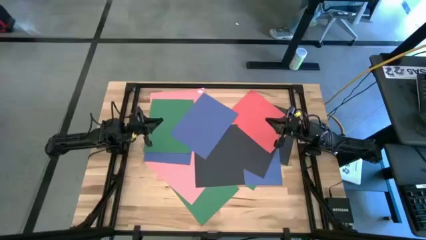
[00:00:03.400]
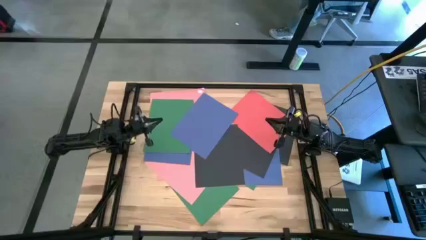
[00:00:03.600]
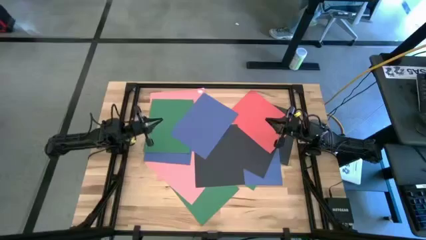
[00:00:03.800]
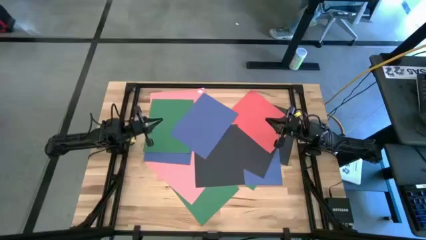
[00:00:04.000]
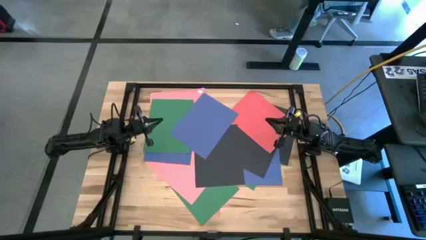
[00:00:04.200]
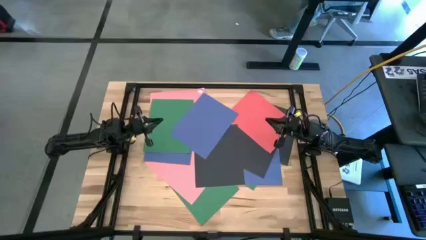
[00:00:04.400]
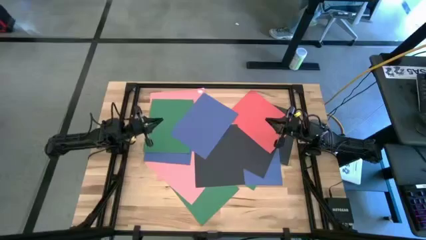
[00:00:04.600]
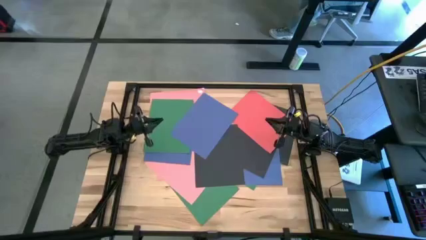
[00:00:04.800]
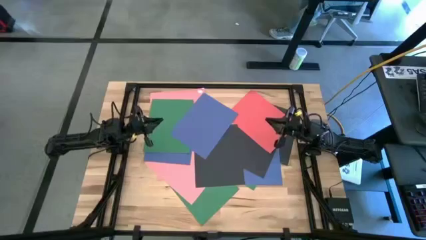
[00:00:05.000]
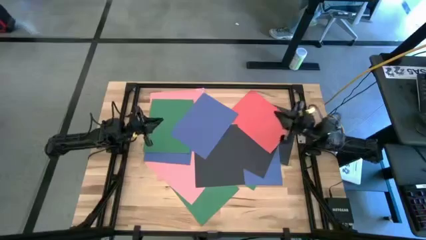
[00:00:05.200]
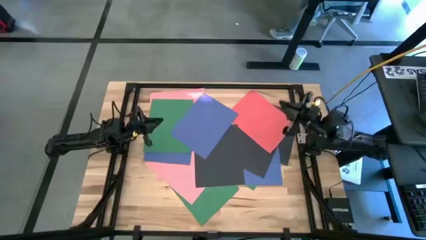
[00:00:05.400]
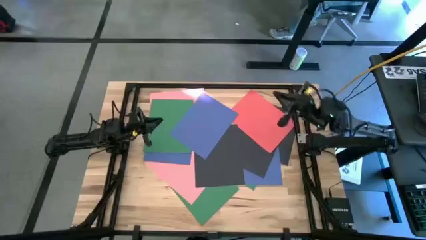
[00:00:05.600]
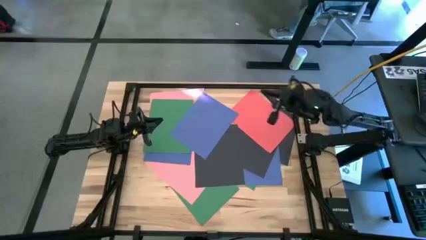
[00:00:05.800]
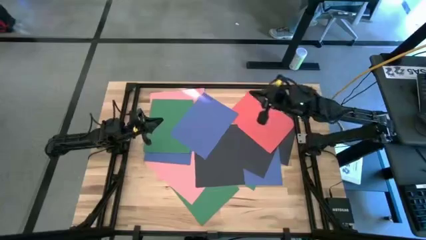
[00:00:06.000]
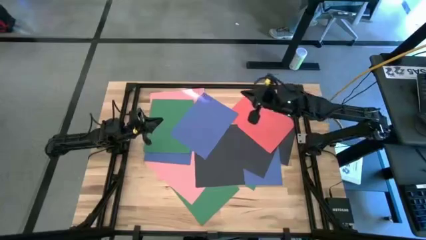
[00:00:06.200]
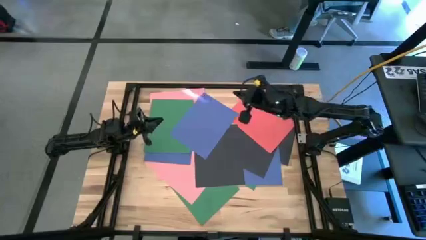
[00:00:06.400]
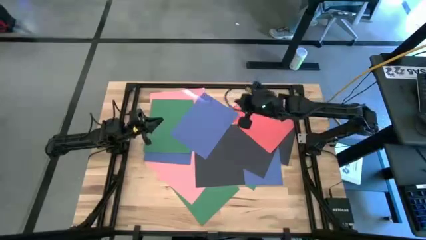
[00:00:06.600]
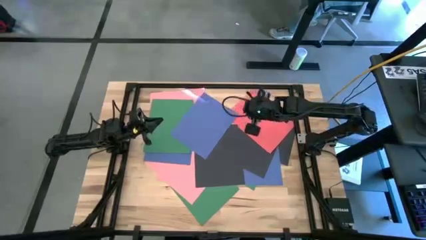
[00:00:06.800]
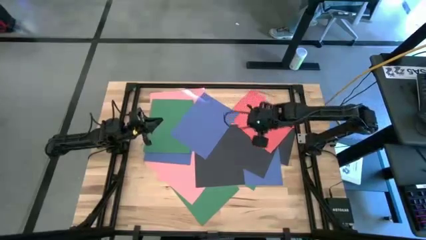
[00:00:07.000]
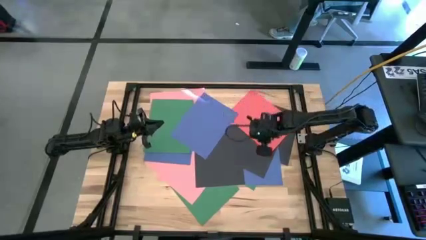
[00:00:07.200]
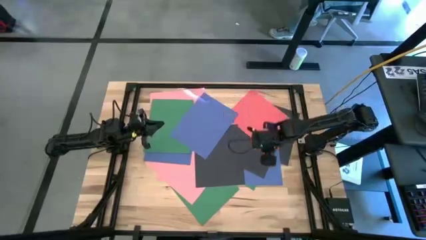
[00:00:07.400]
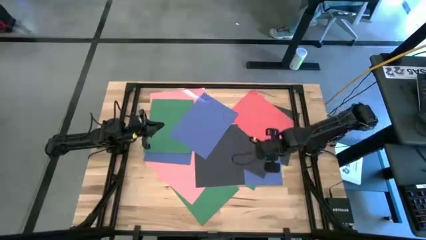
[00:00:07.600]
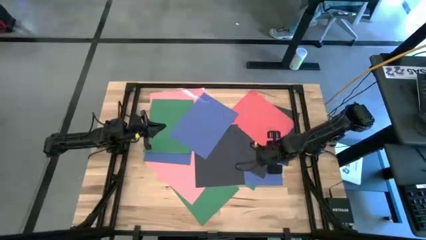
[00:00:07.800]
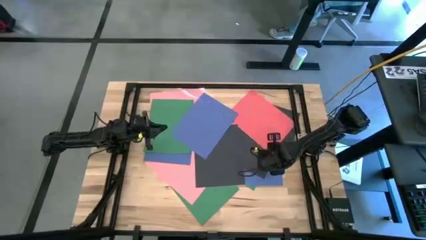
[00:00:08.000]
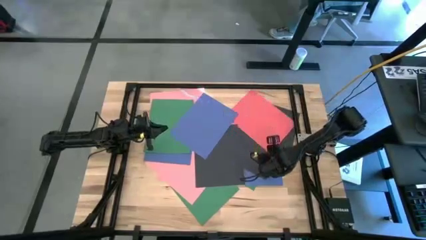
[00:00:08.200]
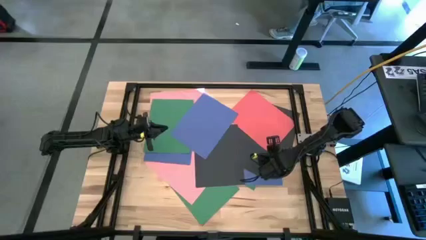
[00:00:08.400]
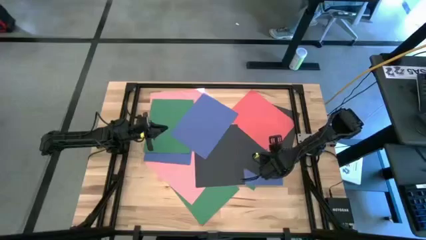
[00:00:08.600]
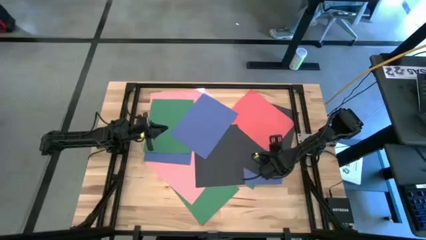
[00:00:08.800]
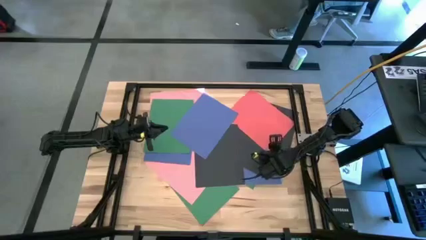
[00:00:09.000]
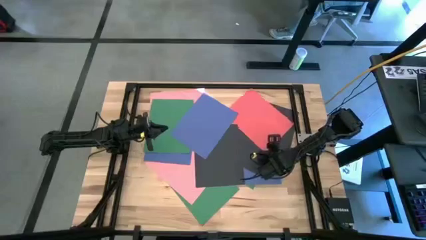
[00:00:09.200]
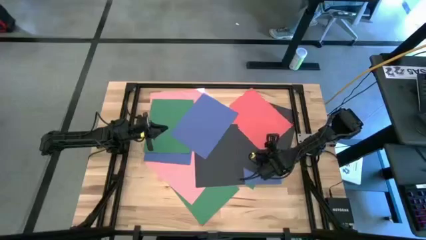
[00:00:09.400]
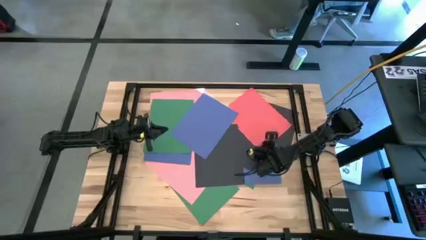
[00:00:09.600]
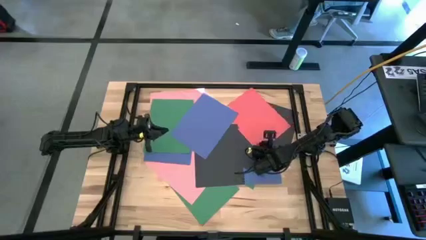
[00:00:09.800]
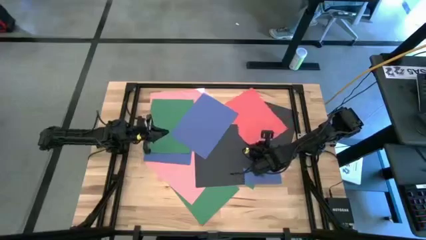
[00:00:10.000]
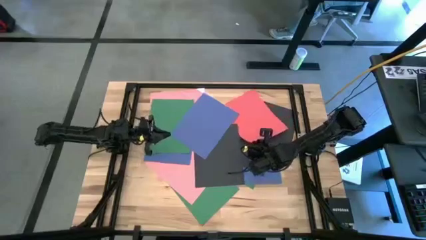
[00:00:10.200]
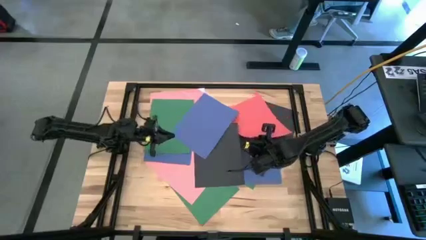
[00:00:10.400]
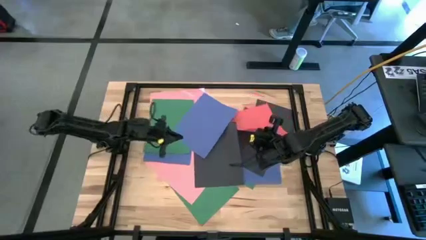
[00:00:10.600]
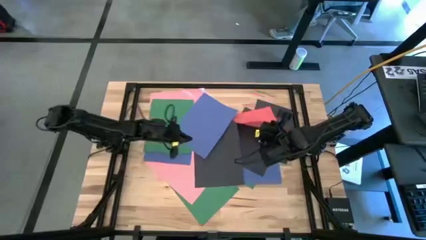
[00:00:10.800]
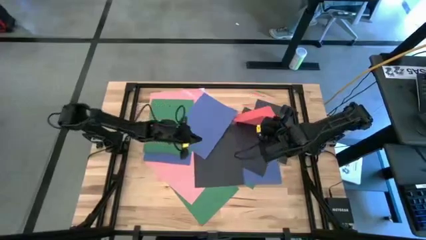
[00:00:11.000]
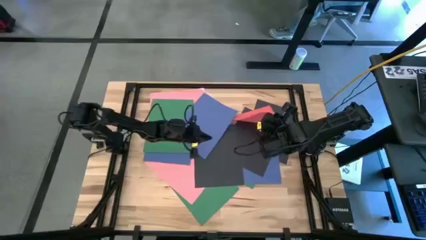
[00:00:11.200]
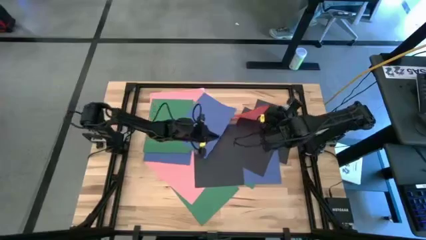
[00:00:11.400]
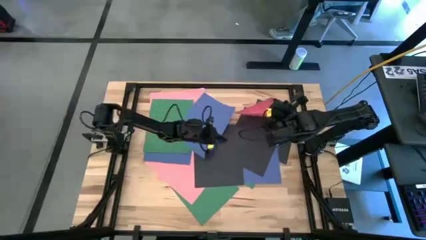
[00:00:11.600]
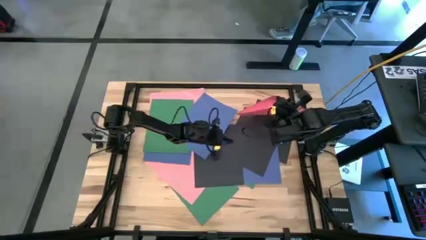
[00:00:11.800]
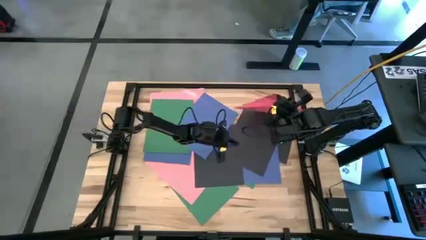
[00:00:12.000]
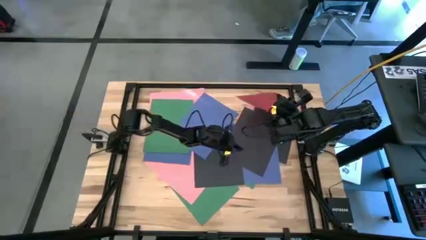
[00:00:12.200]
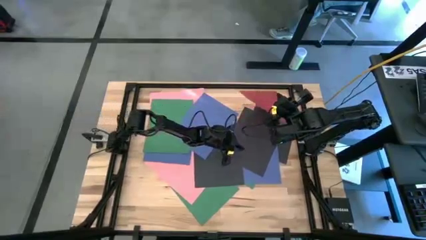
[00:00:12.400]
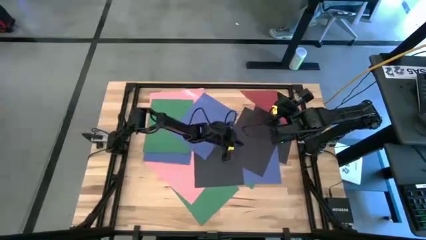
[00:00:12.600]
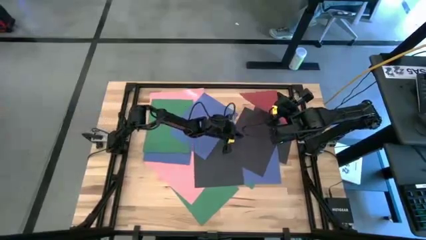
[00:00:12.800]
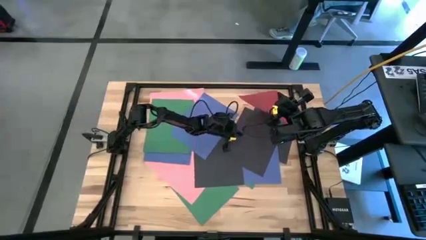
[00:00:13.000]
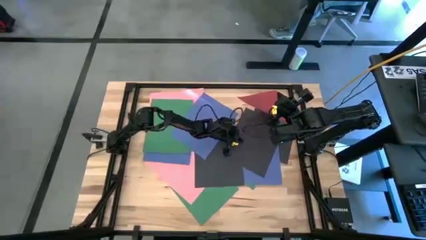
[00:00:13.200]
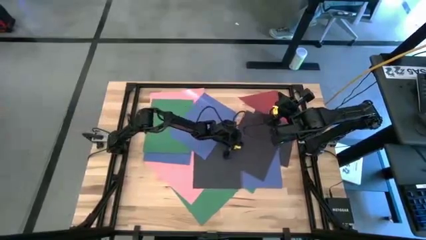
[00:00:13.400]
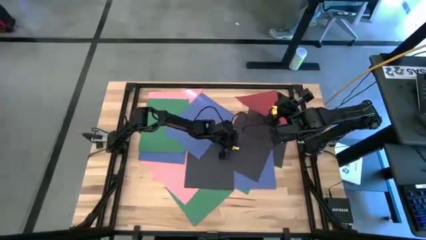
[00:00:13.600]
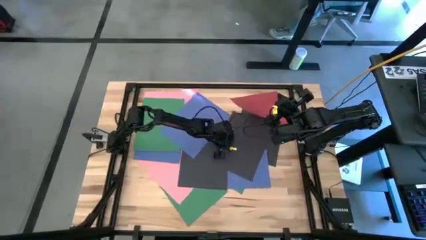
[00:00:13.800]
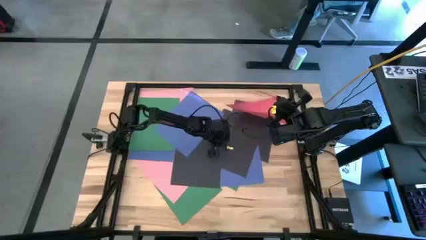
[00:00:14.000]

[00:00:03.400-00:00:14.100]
Task: Organize paper
Move the red paper to the bottom right of the table

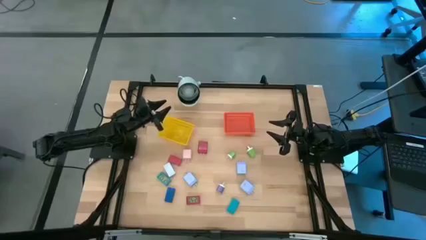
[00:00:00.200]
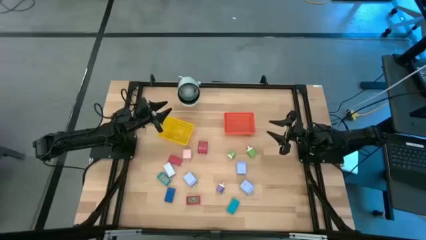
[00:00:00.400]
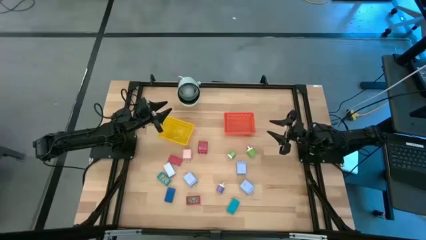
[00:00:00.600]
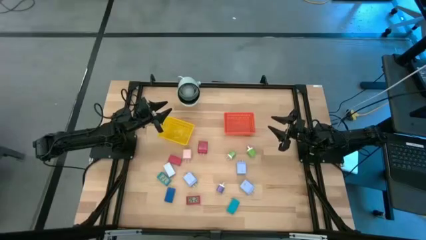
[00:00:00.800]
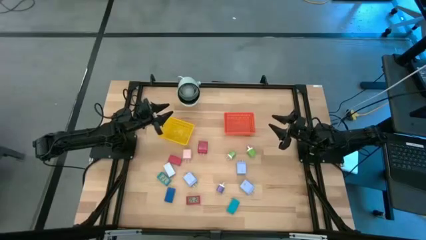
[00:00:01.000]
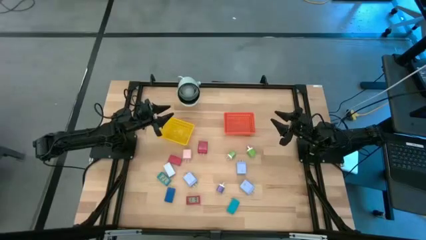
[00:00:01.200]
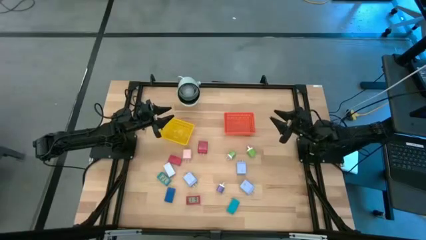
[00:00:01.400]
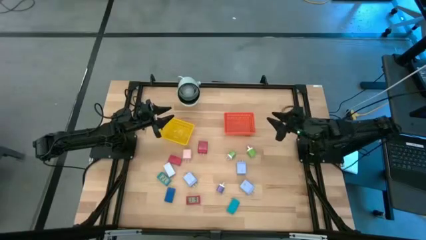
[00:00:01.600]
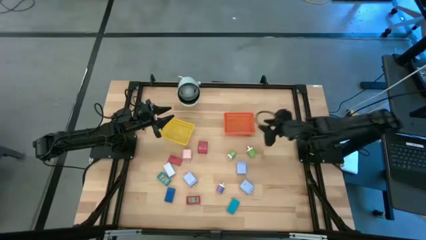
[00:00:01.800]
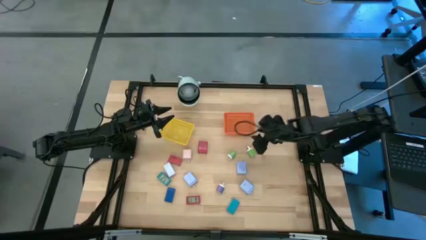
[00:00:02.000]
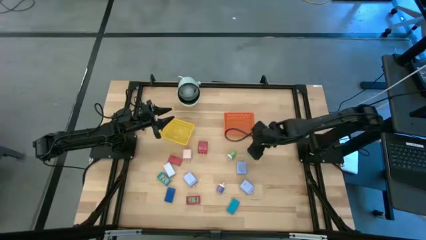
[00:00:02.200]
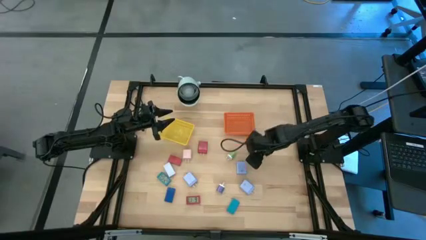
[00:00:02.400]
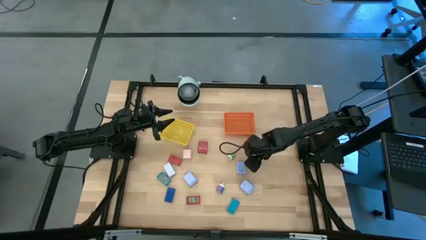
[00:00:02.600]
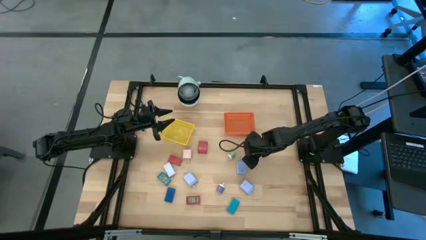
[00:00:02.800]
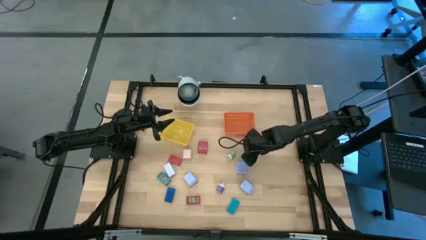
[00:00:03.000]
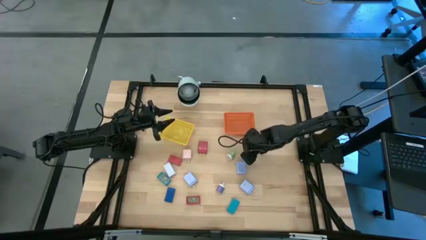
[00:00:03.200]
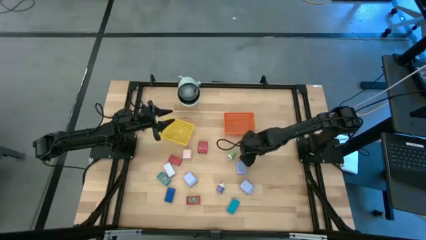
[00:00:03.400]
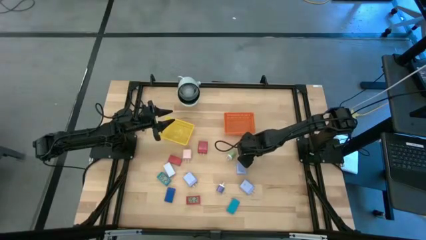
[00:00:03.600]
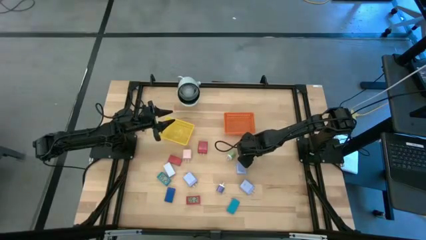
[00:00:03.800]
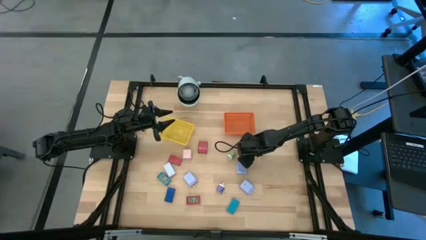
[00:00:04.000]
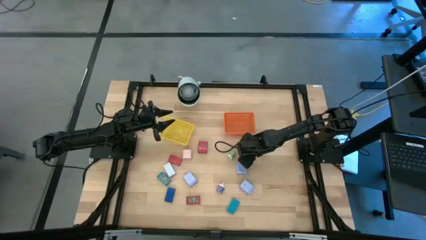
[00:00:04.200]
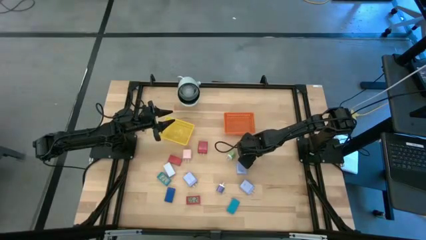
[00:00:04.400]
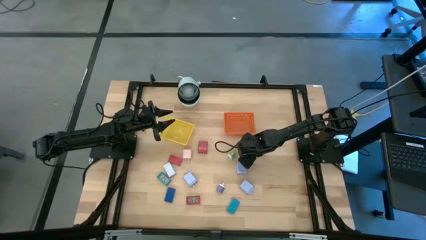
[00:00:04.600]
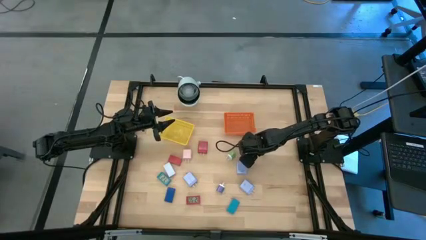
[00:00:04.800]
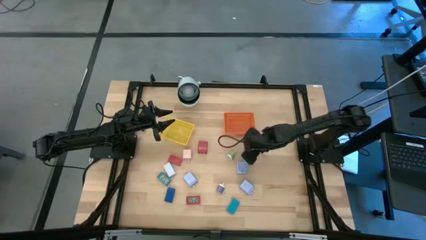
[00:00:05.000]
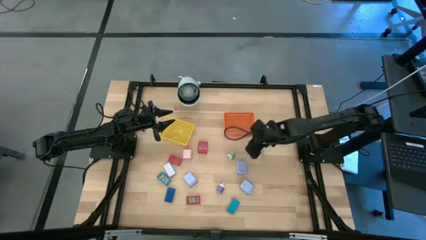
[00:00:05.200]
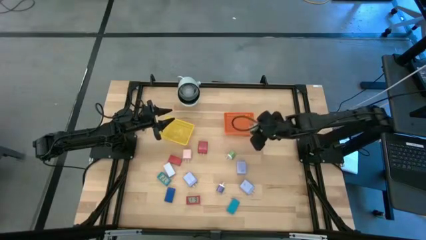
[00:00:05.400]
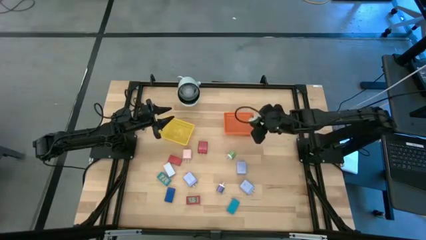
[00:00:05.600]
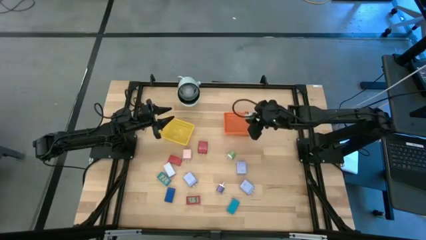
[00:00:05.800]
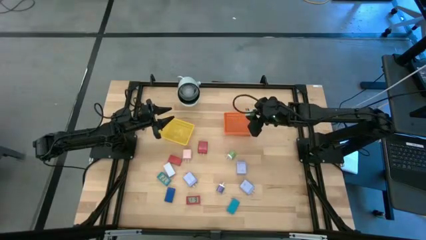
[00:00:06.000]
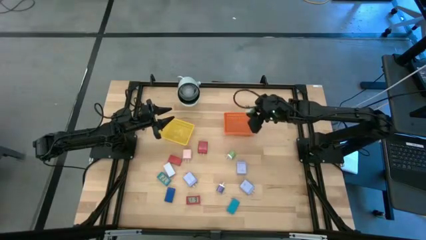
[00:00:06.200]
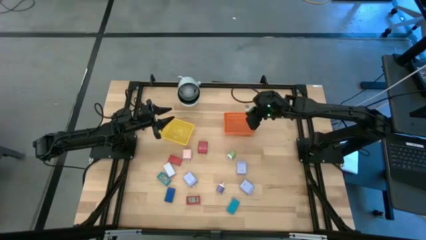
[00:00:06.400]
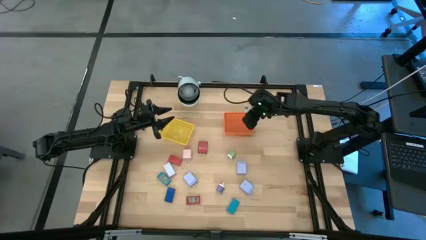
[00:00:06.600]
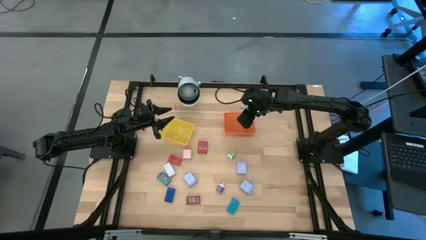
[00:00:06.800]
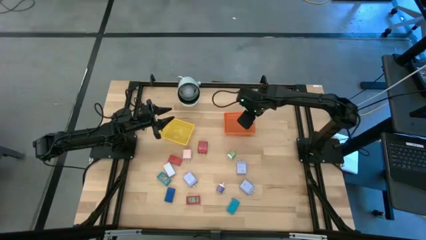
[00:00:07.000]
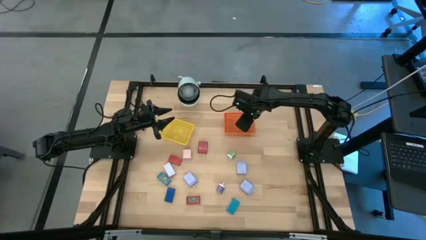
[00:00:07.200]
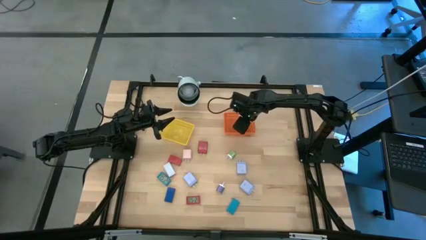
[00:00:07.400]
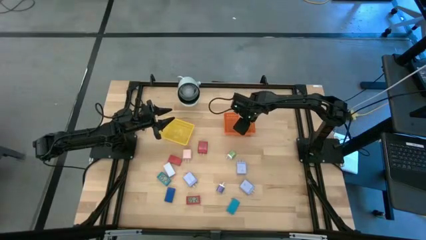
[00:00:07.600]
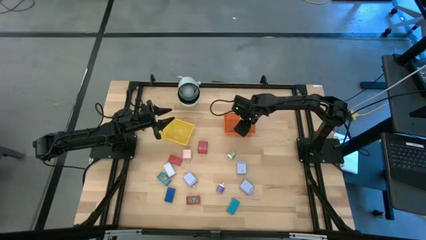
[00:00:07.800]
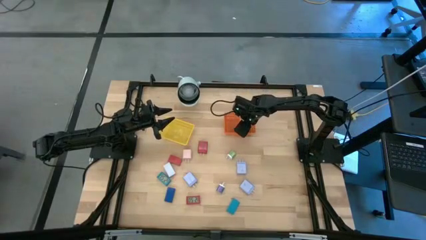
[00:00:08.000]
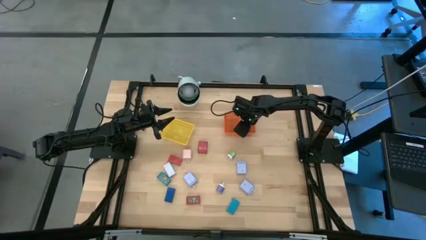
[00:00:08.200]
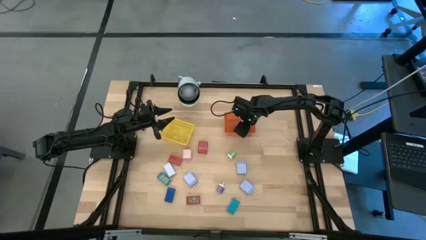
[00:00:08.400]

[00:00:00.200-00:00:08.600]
Task: Pick & Place Office items
Put the right green charger adapter into the orange bin
